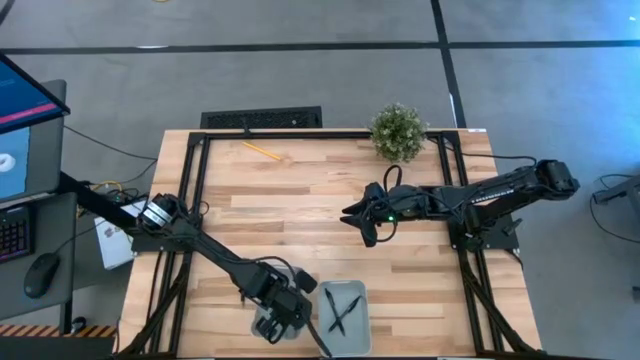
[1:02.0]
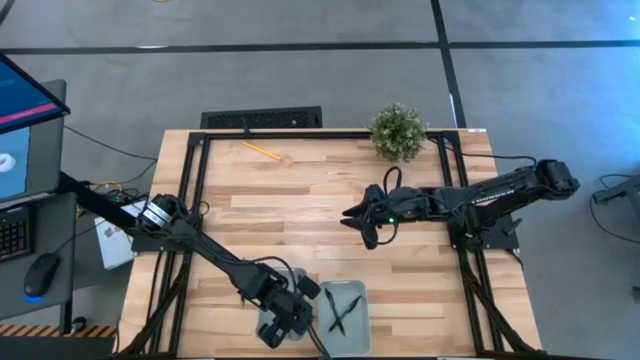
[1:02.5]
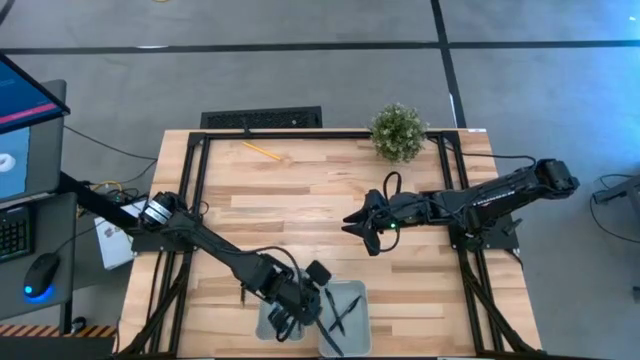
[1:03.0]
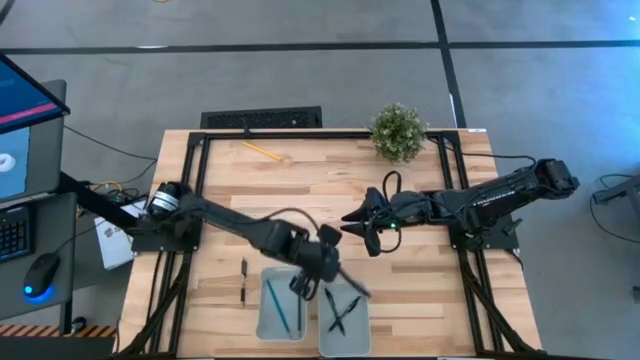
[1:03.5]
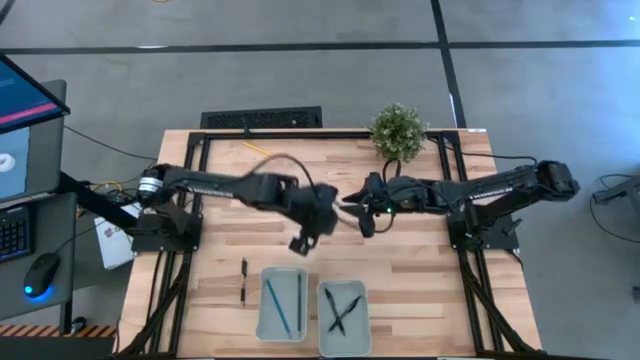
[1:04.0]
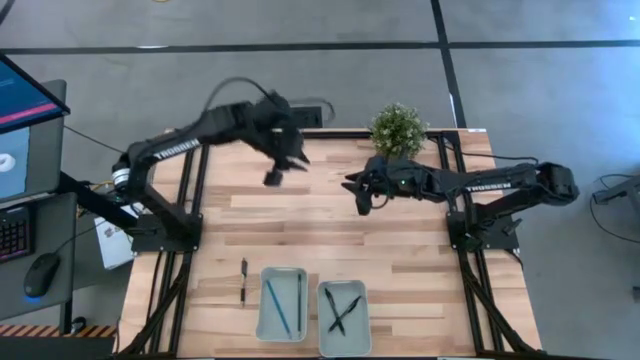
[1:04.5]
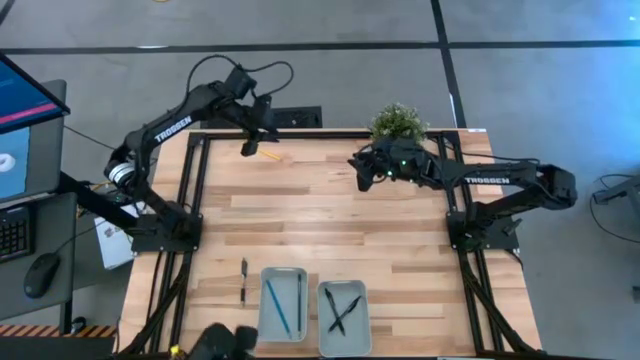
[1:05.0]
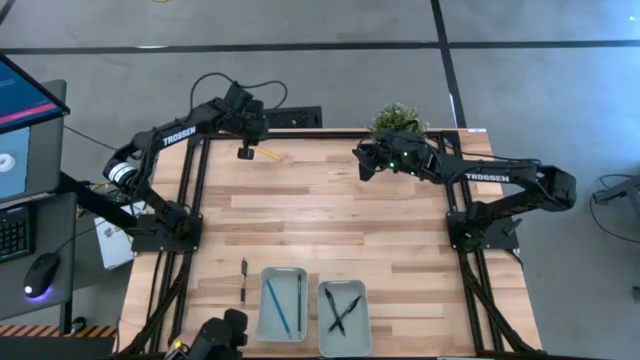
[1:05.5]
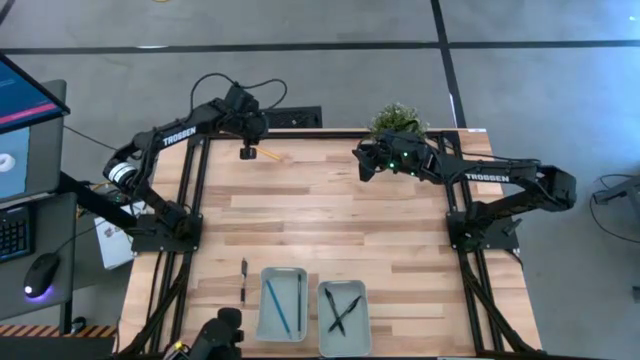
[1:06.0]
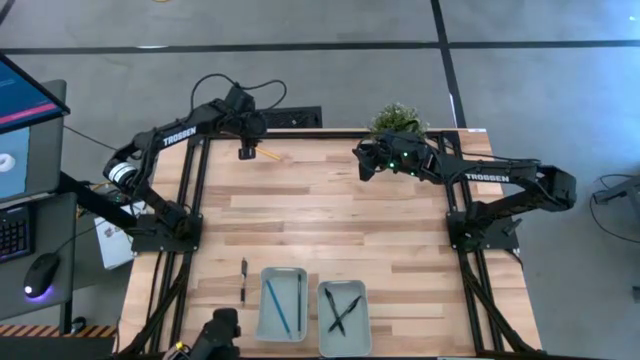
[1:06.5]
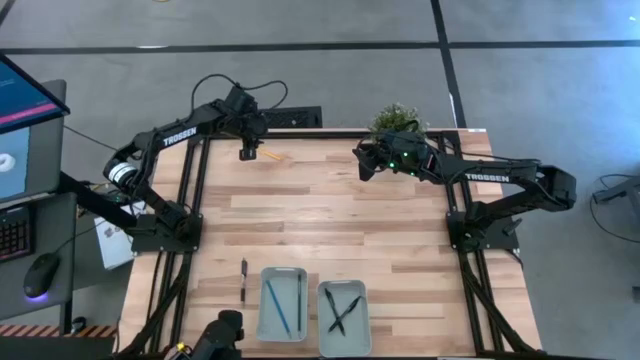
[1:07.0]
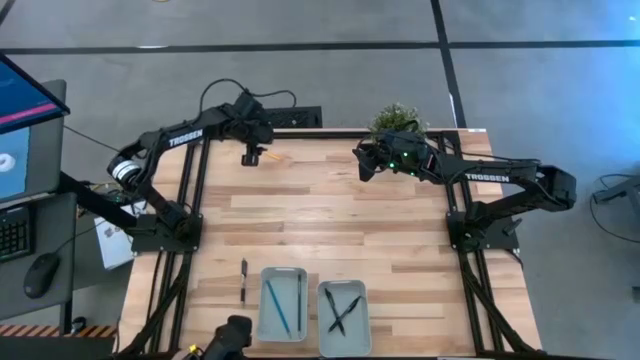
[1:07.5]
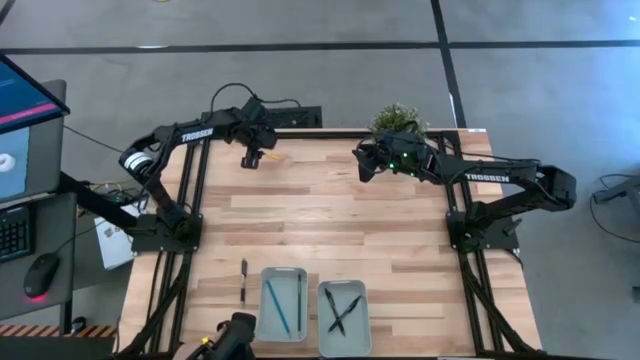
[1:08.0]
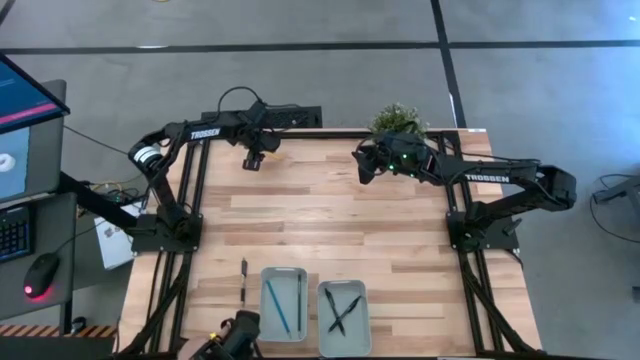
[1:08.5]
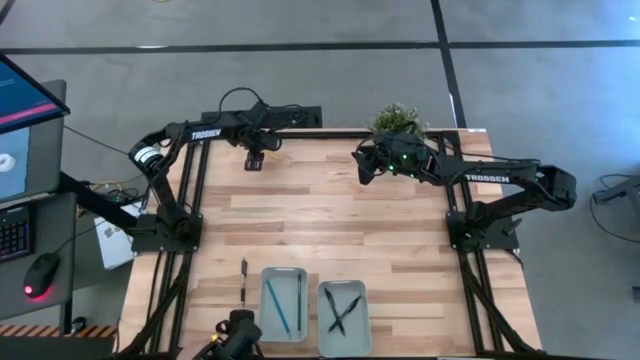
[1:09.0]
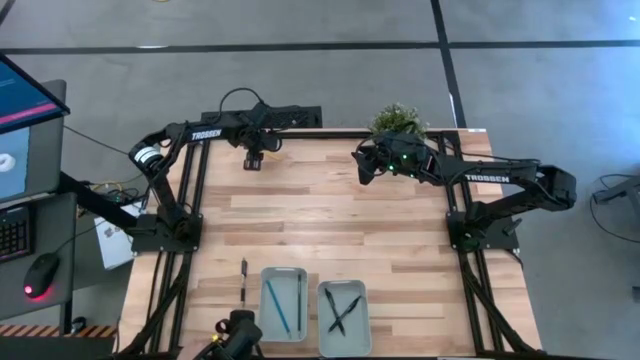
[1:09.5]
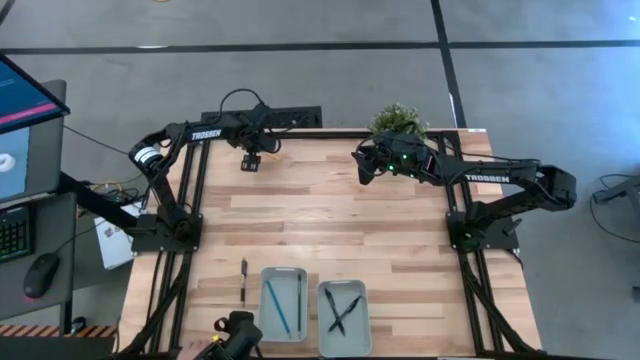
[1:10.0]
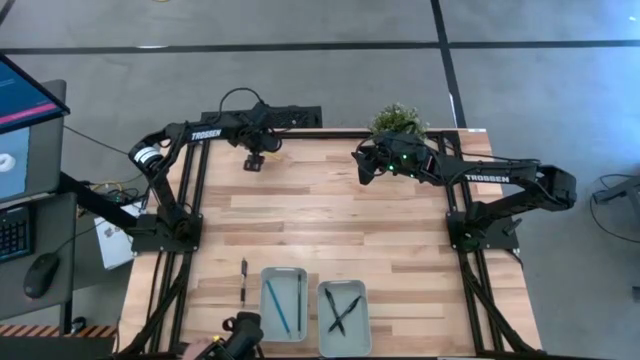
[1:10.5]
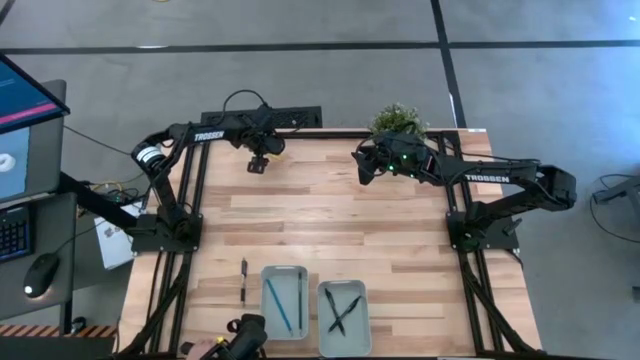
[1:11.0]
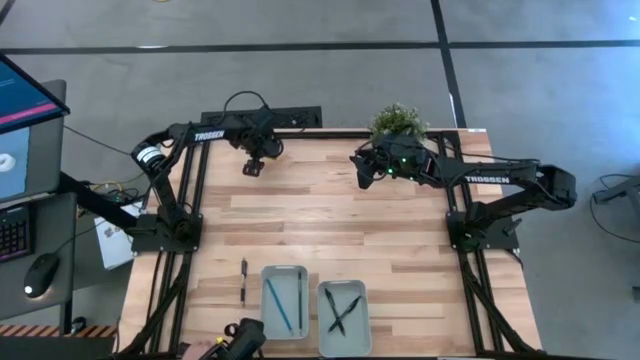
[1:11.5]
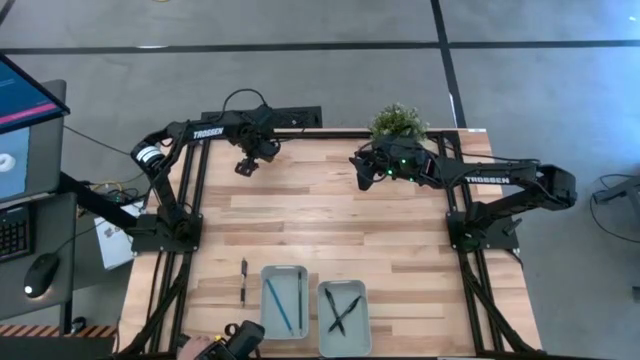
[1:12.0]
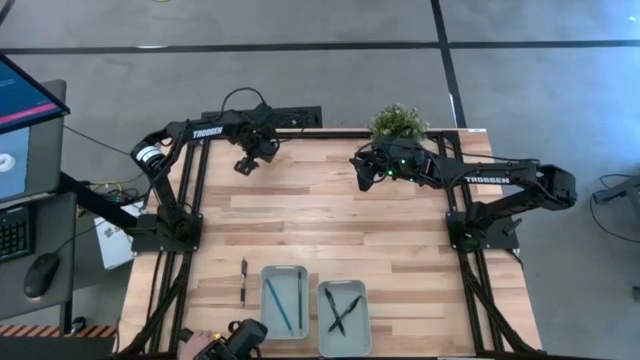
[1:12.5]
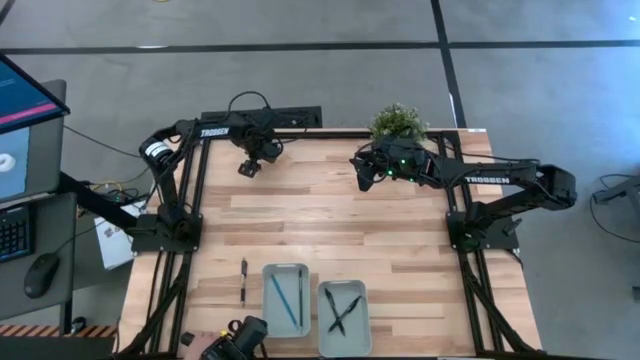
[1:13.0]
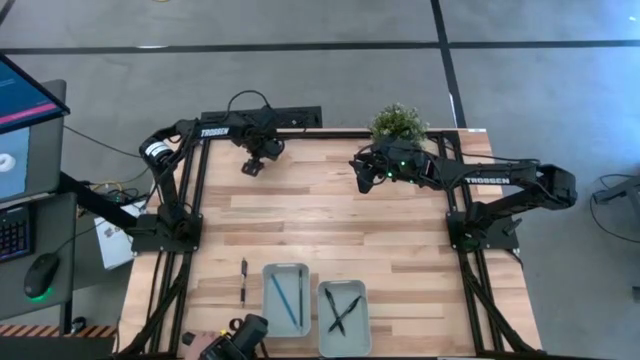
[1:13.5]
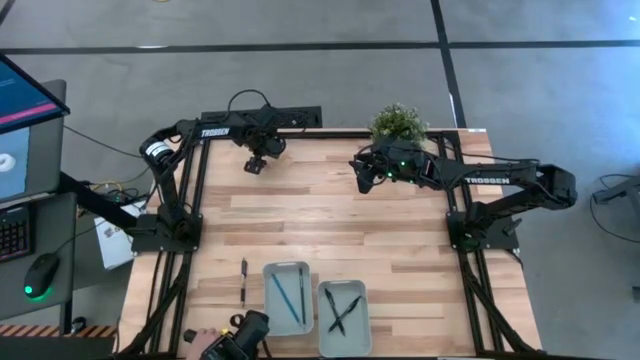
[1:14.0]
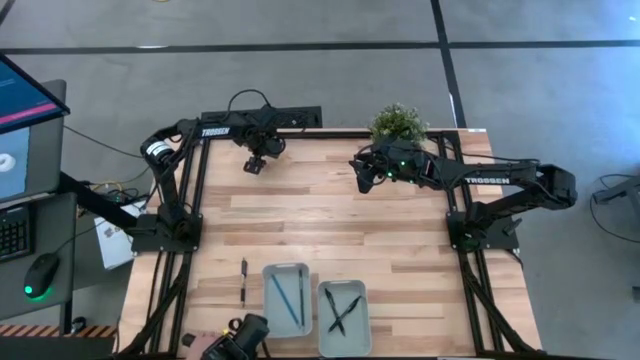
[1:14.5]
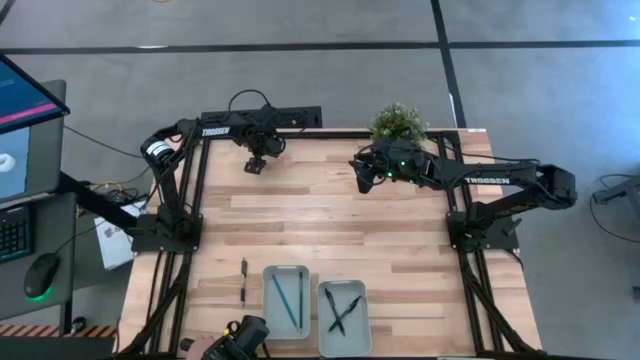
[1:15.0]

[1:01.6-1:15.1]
Task: Sort pens & pencils
Put the yellow pencil into the left gray bin

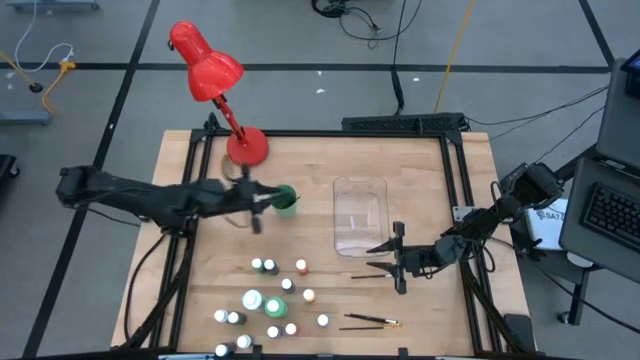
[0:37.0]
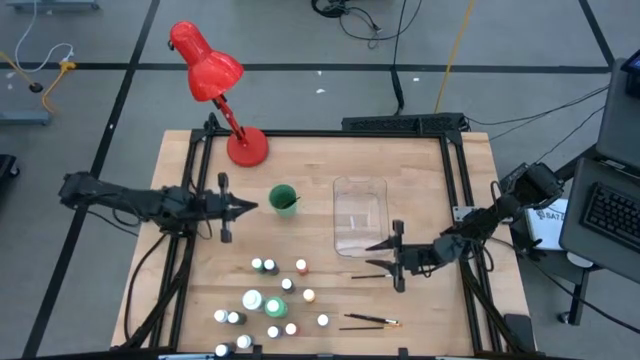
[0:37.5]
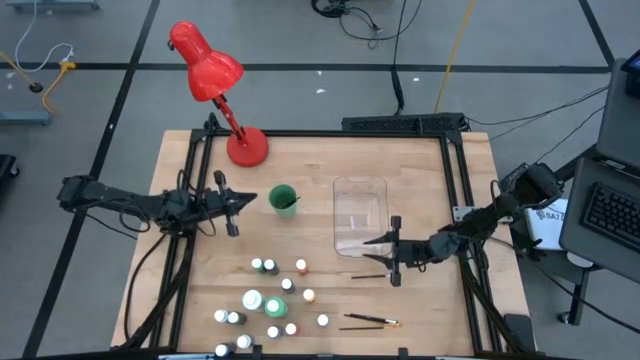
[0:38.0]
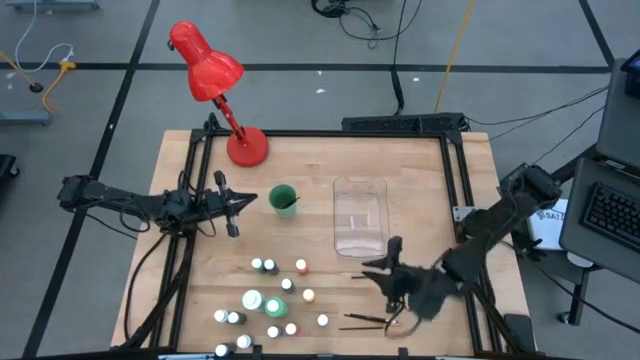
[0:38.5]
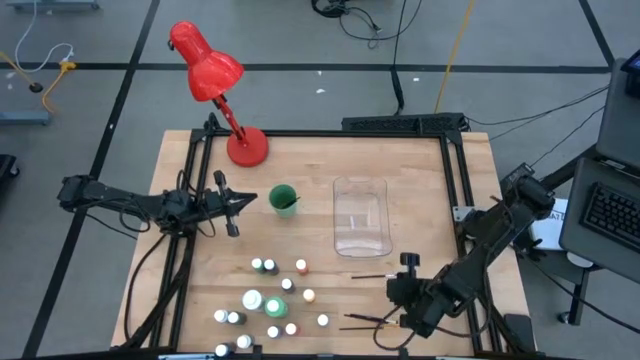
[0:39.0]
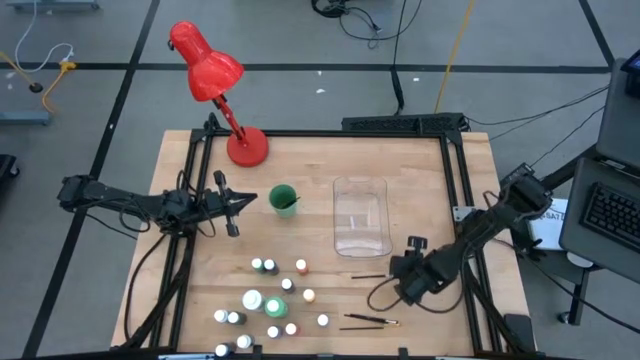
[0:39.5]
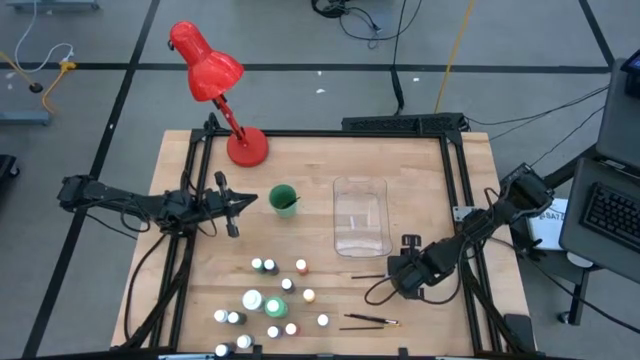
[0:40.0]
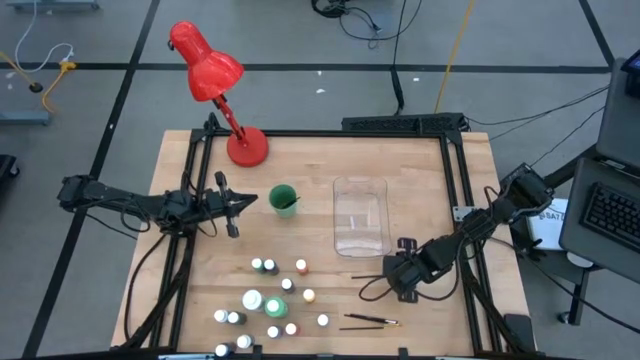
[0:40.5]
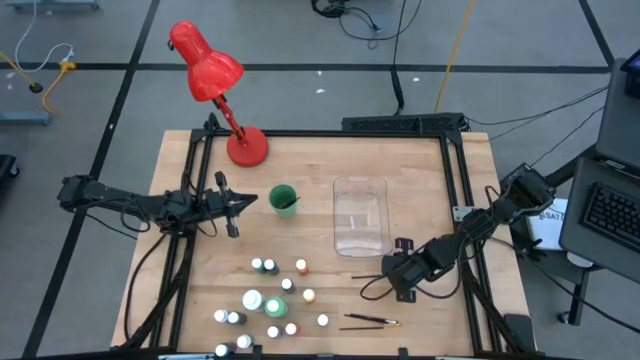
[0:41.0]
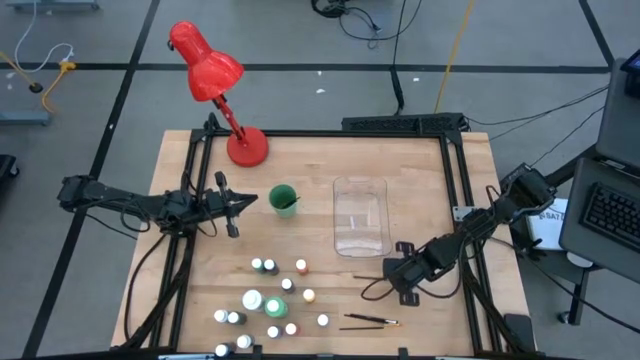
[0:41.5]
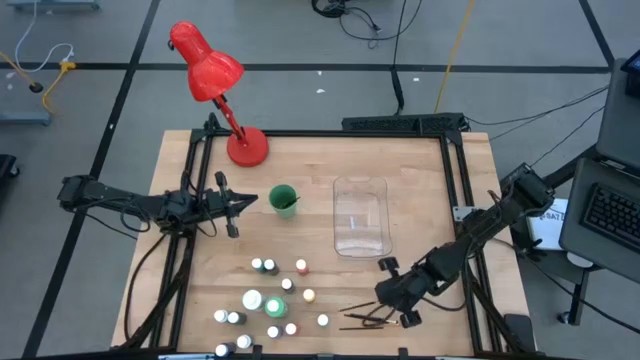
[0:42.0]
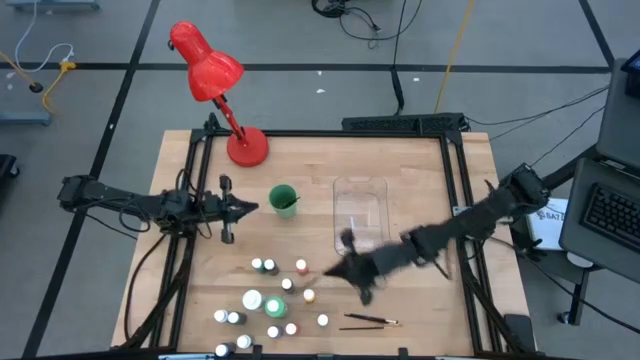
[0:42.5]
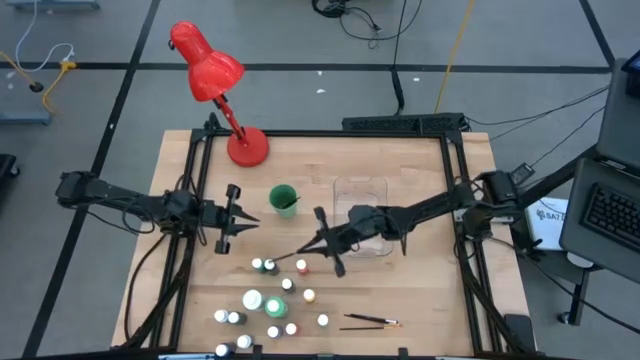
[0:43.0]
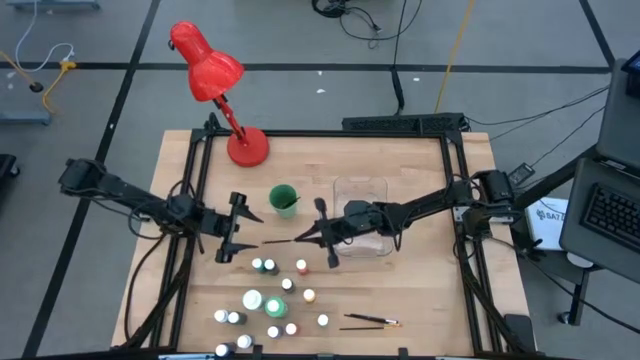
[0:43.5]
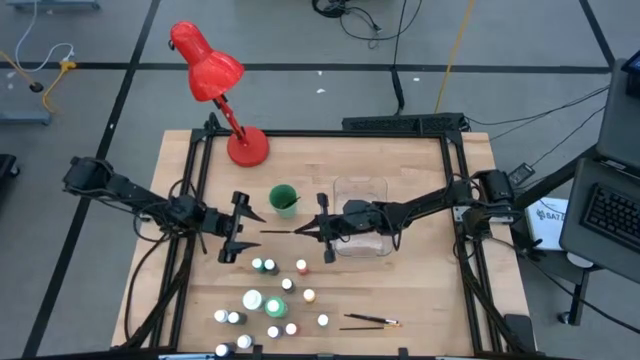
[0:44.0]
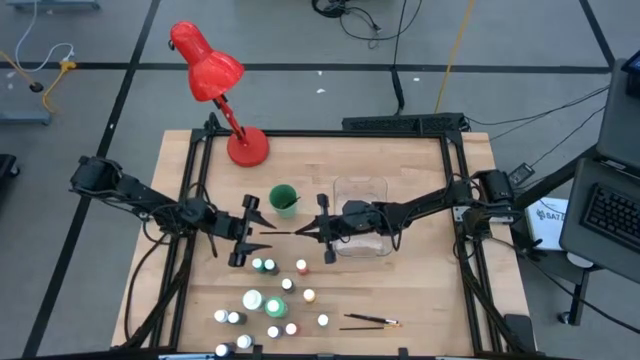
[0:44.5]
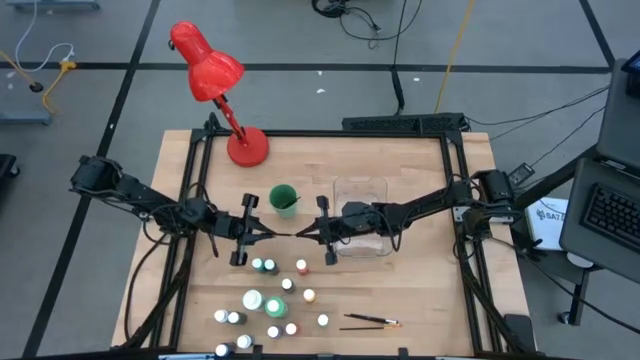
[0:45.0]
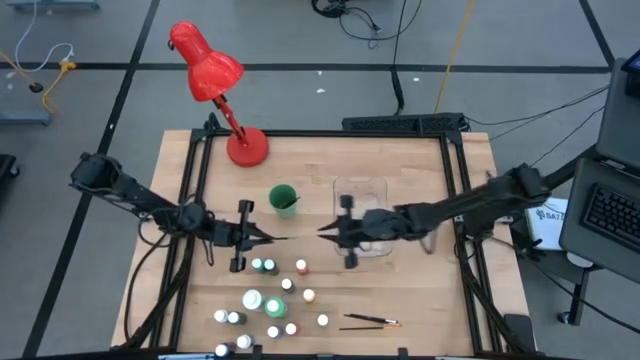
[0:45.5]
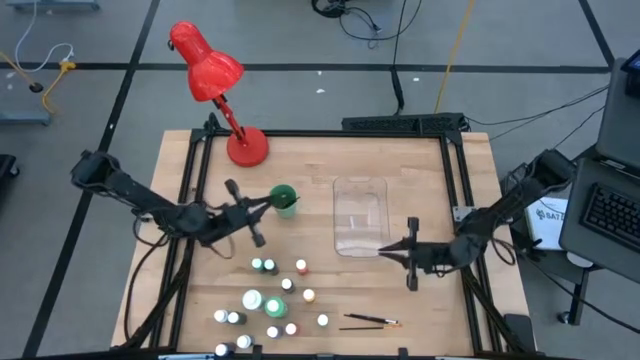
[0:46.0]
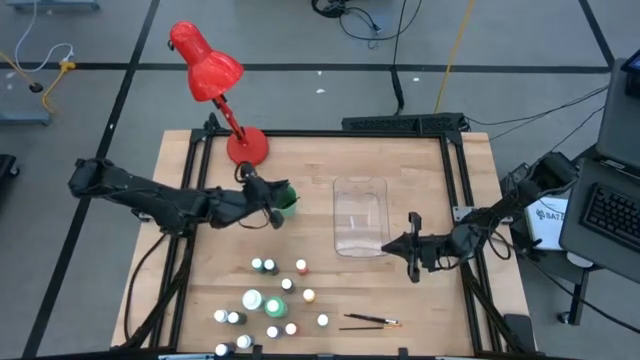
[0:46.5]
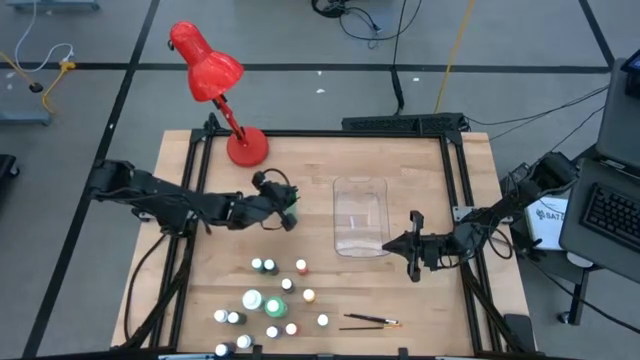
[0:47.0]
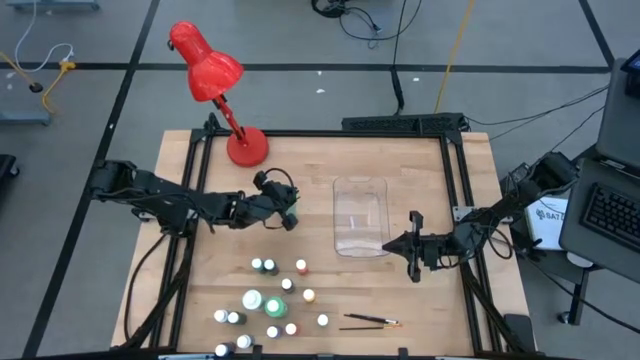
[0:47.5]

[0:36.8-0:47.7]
Task: Pick & Place Paint Supplies
Put the silver paintbrush into the green cup
